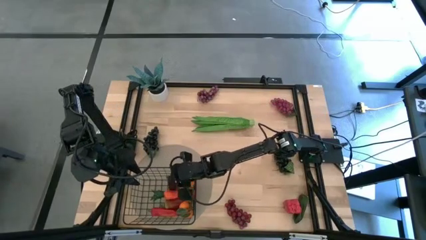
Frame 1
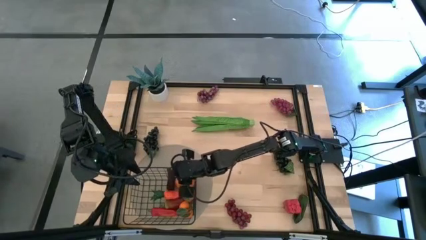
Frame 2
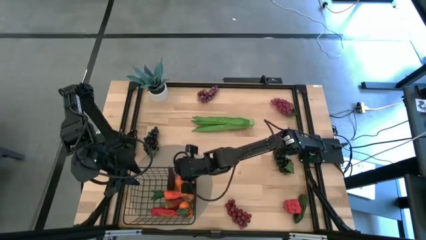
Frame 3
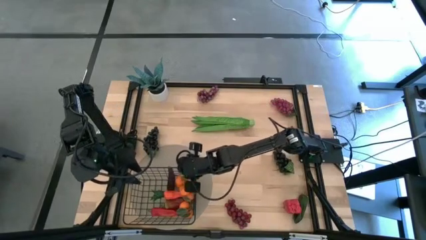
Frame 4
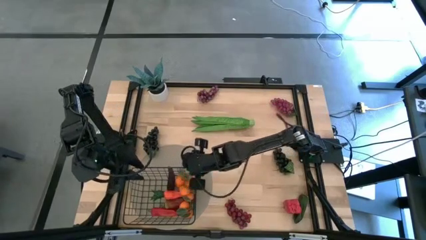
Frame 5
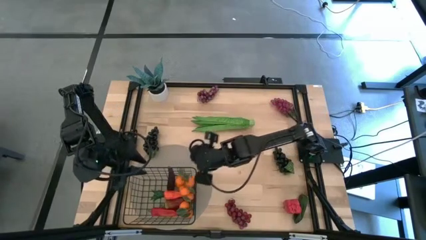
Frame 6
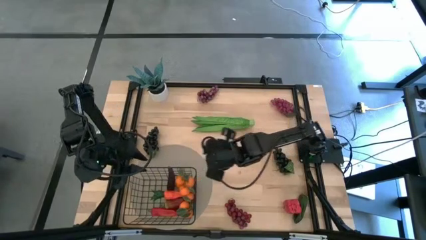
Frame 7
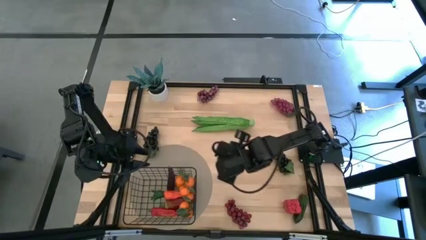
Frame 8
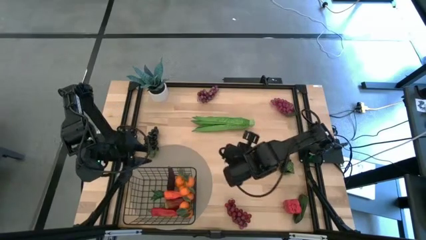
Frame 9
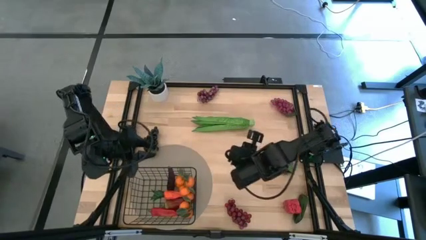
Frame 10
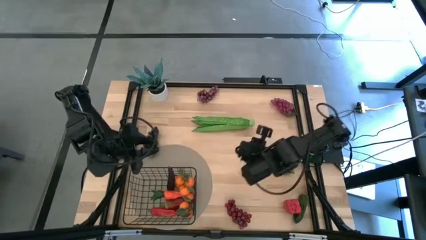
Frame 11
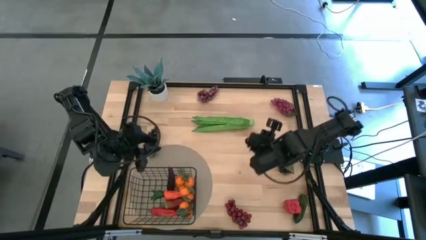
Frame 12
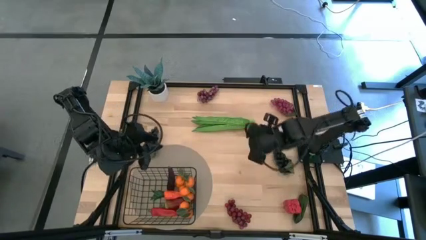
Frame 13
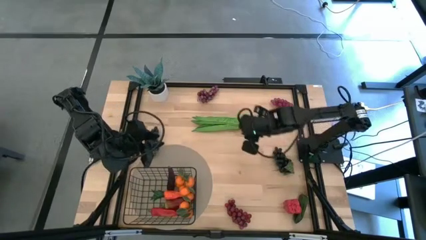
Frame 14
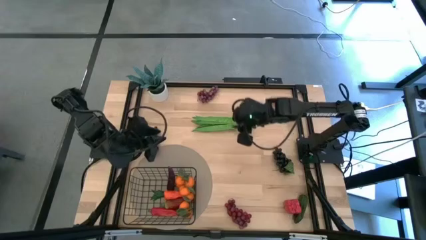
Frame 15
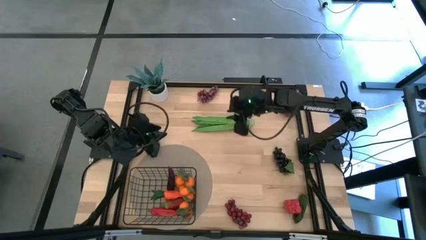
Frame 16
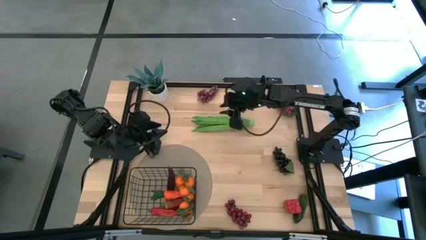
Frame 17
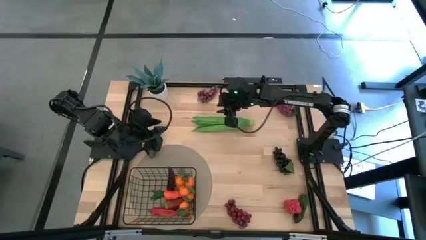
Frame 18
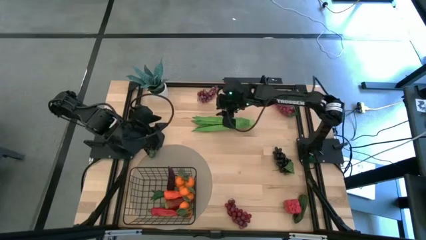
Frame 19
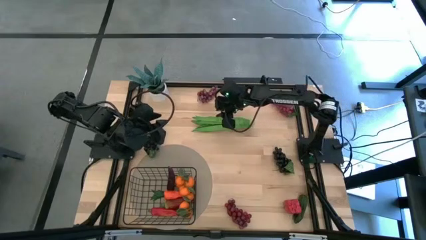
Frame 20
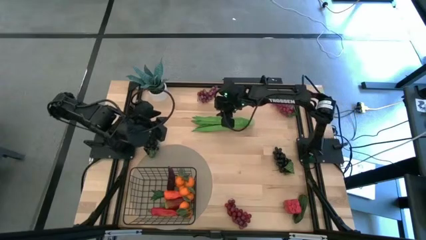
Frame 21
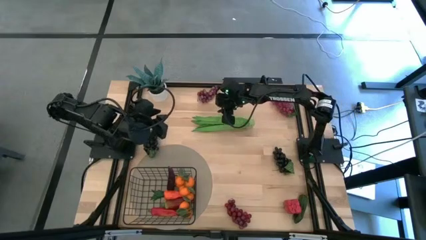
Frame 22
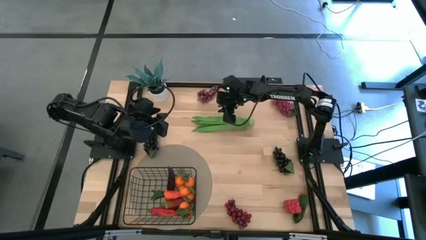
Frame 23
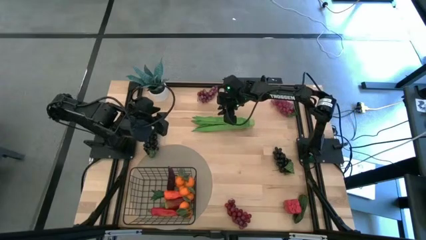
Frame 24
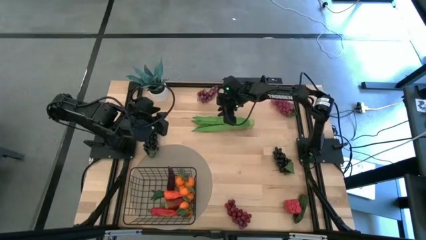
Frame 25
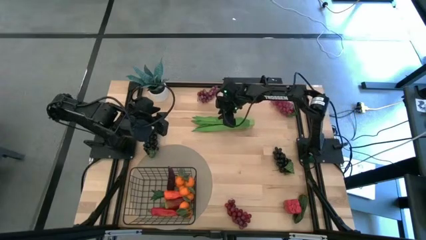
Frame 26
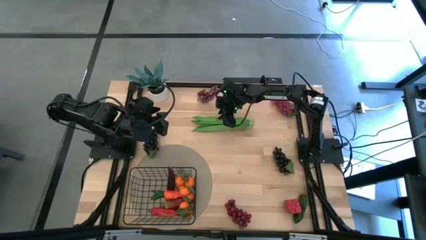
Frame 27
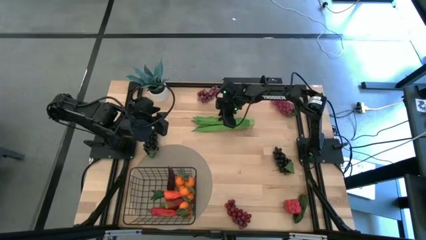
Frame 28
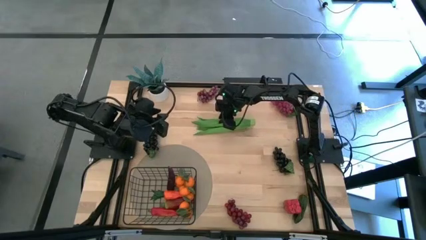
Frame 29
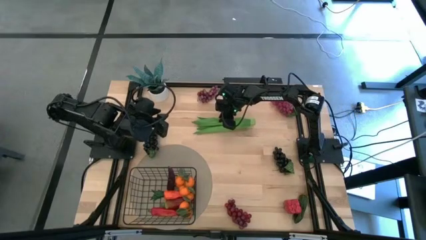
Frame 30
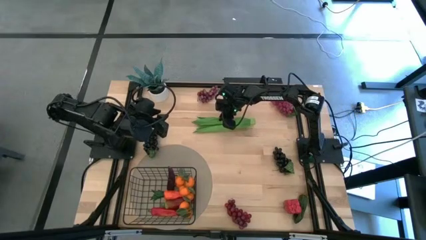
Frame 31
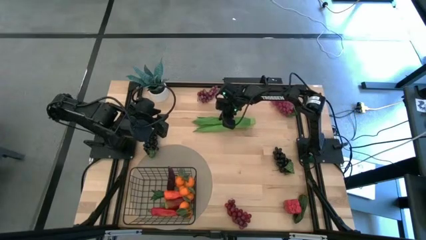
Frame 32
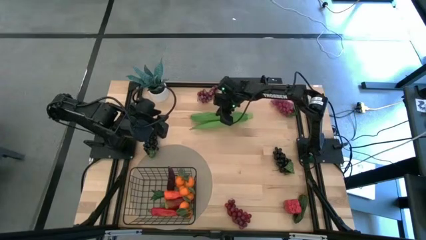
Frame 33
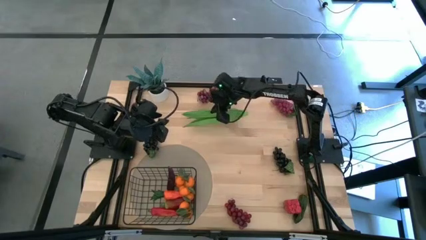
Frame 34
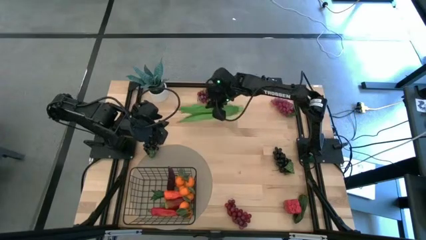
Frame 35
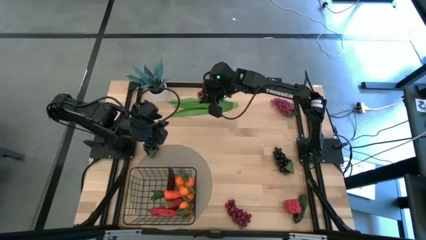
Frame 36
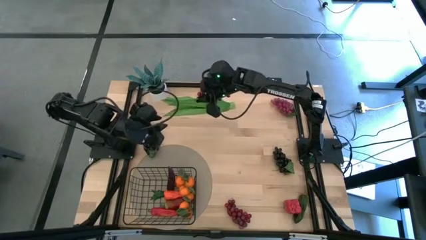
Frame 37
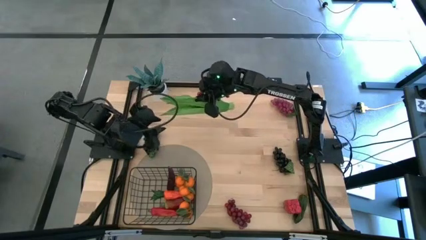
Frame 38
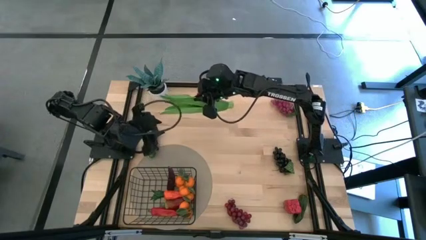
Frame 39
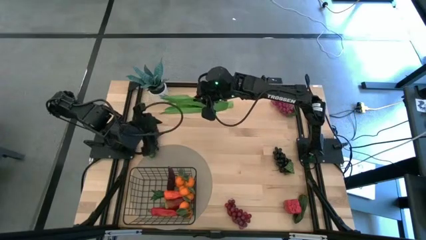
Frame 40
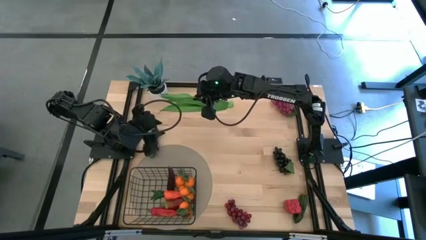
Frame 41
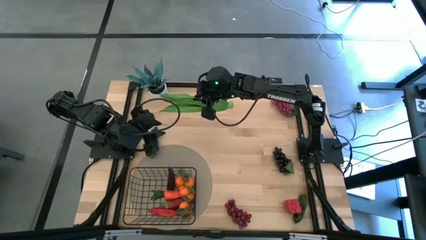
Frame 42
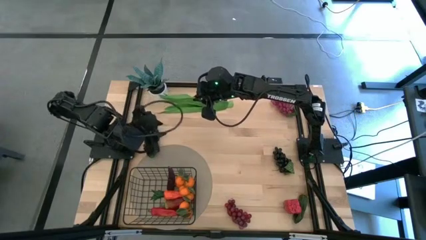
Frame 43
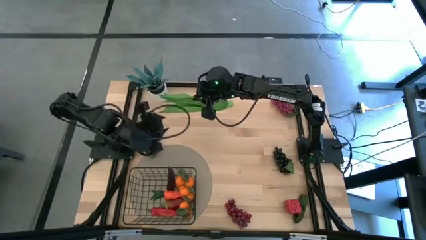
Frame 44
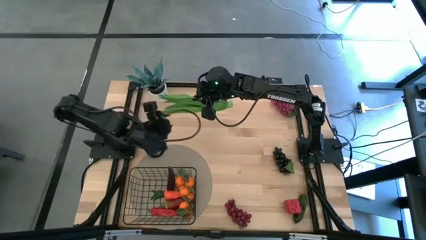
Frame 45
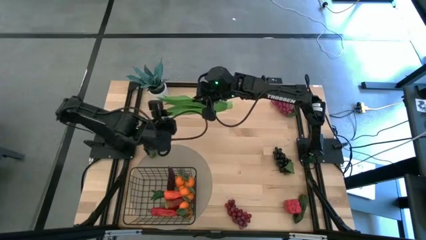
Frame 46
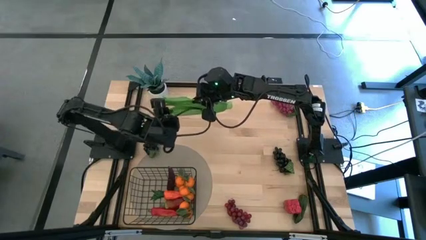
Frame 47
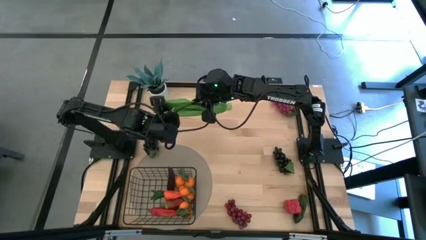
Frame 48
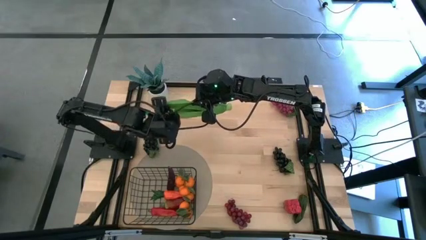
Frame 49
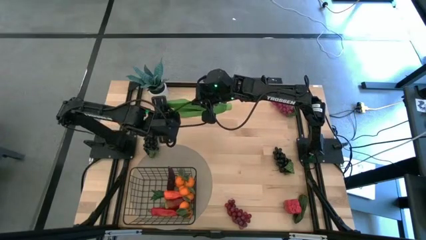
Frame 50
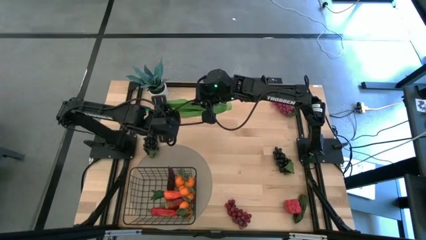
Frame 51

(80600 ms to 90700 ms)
Task: Build produce basket
Put the lettuce into the wire basket

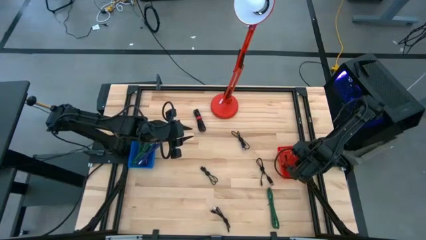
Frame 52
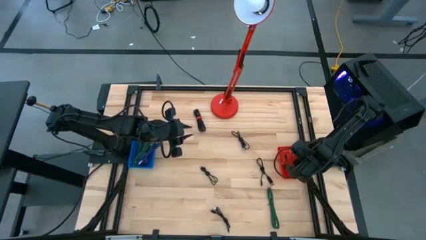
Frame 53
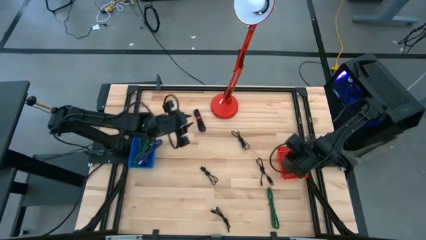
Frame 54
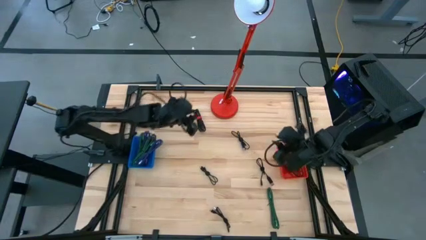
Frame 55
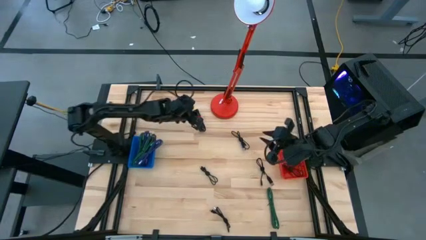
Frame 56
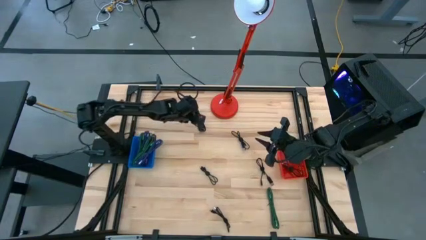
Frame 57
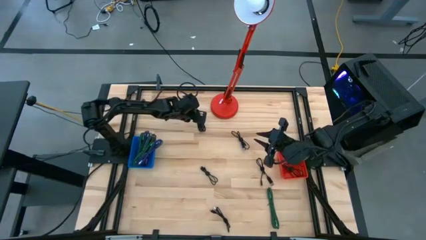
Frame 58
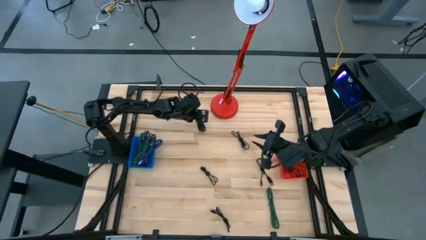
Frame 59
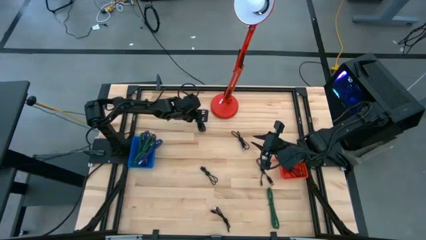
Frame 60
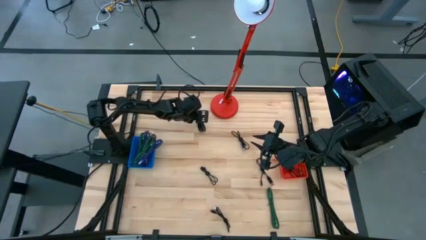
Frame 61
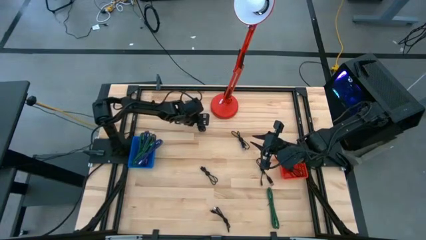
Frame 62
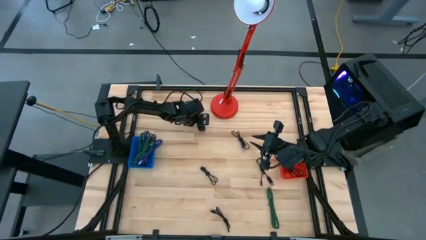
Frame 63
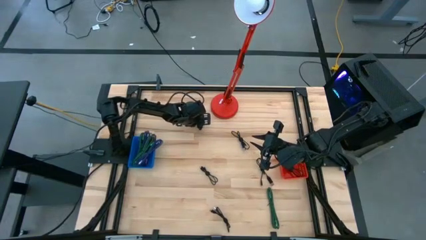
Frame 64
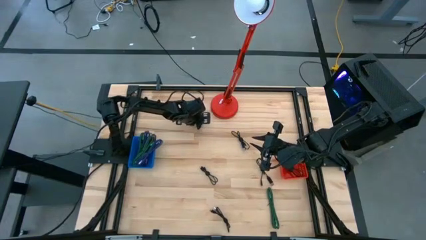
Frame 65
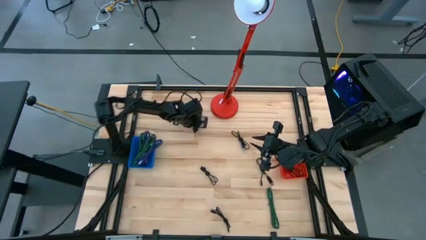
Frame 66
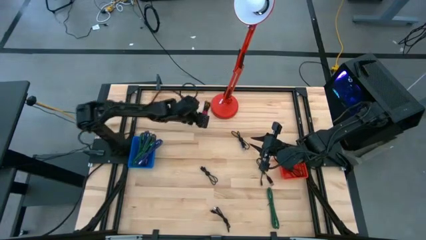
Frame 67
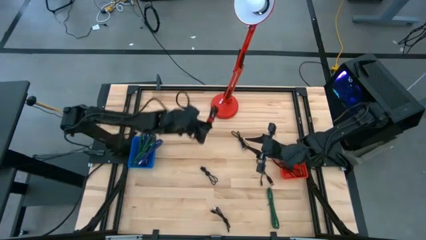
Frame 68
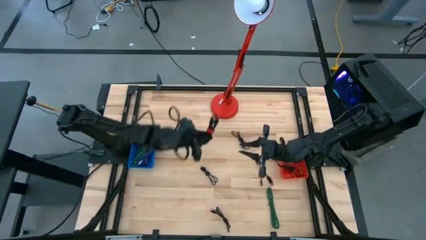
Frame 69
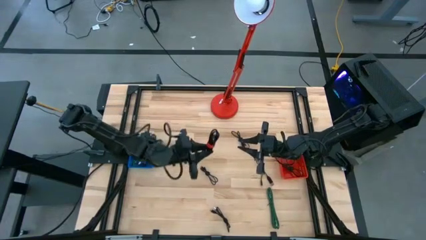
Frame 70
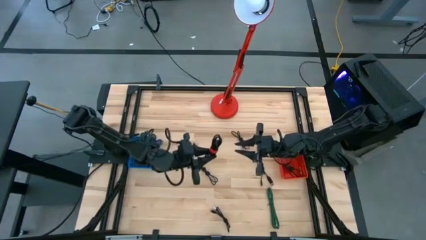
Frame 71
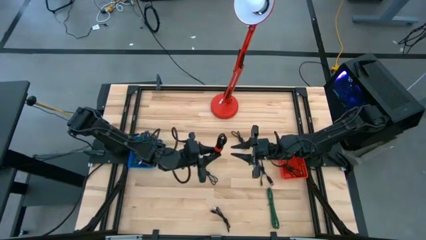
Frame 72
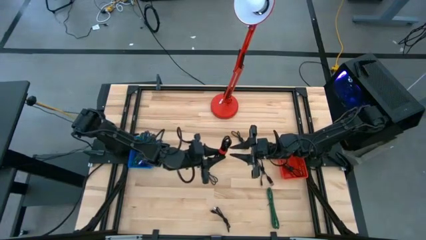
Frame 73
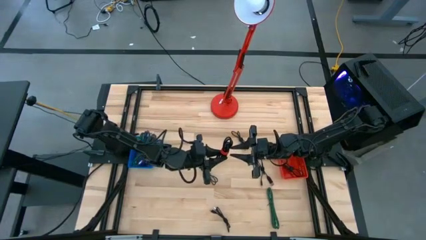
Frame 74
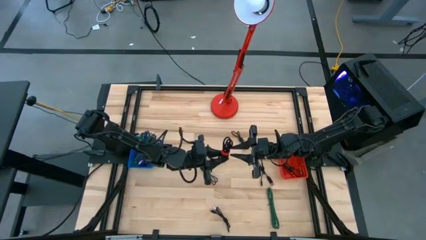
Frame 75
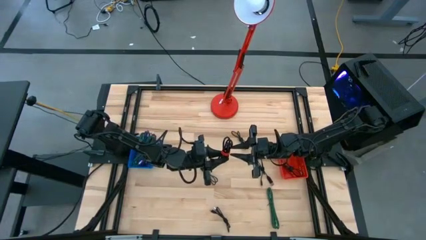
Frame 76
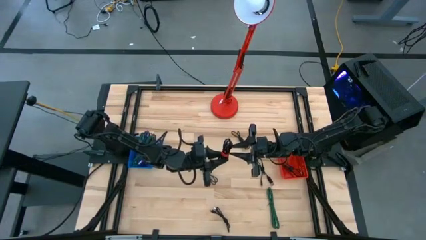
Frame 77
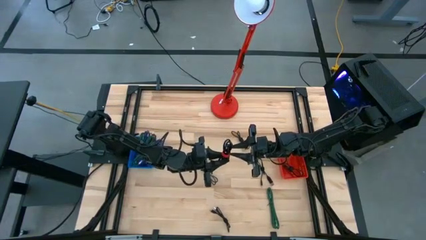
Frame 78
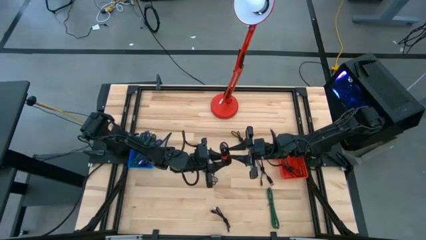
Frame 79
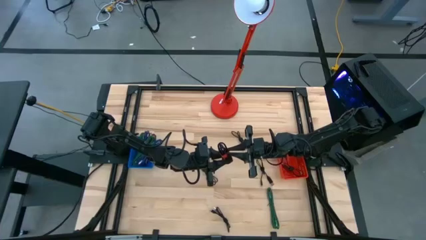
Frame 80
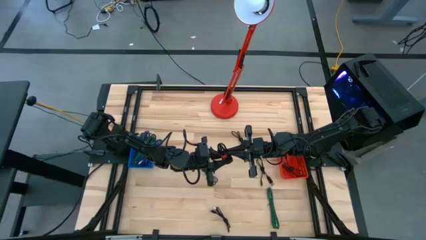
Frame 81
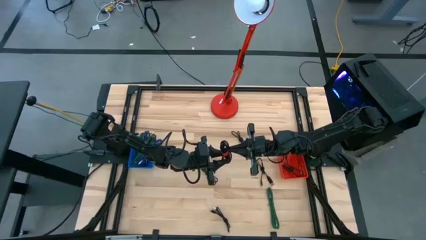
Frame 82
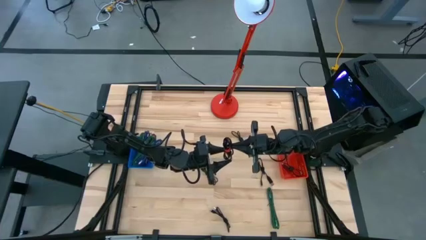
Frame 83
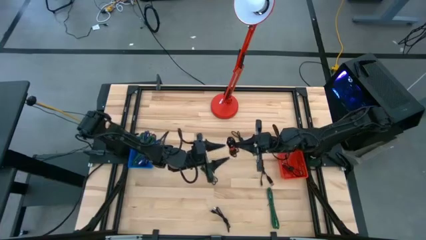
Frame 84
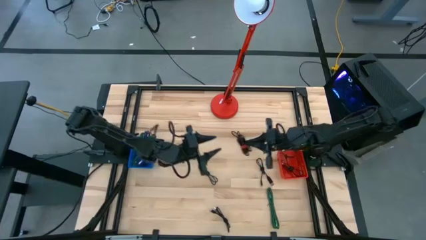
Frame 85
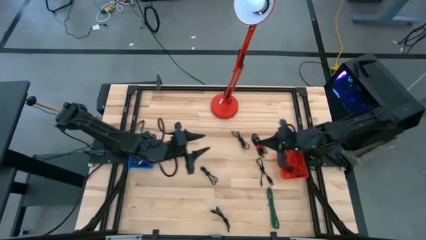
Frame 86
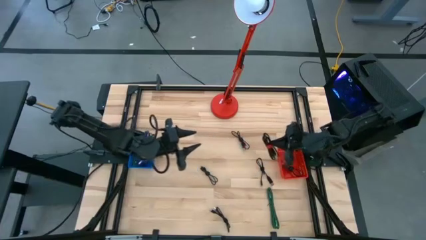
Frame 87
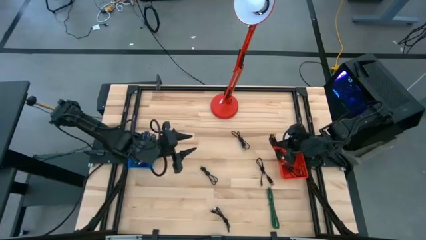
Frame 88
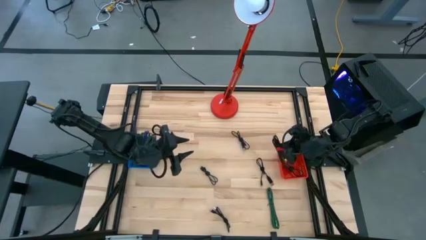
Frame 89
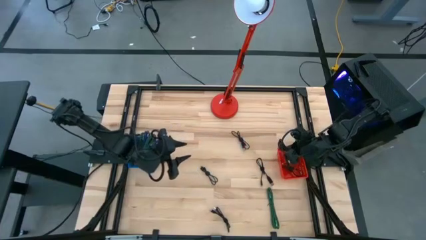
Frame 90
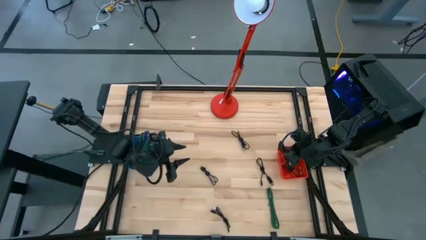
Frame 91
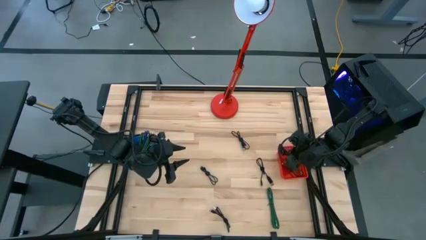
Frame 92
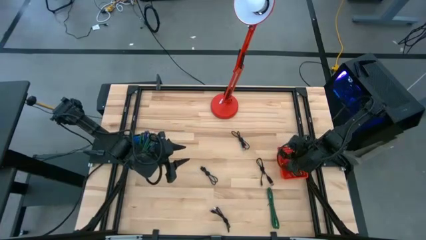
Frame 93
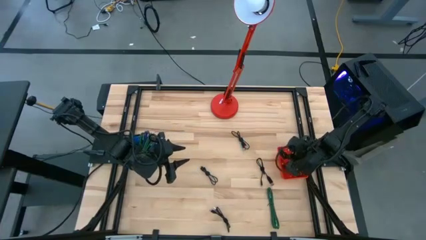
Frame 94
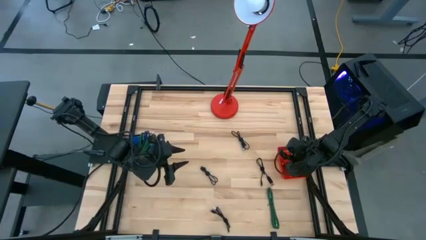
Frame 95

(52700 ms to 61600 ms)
Task: Pick & Place USB Port
Put the black charger cable into the red bin
